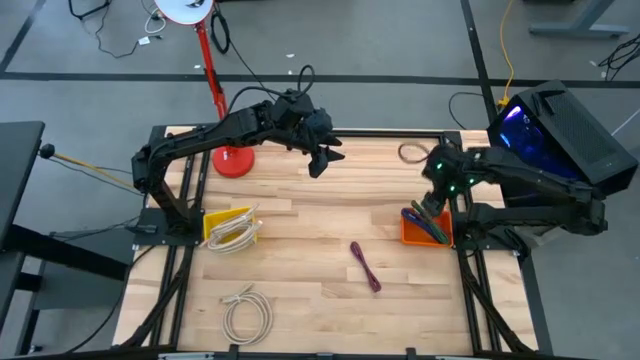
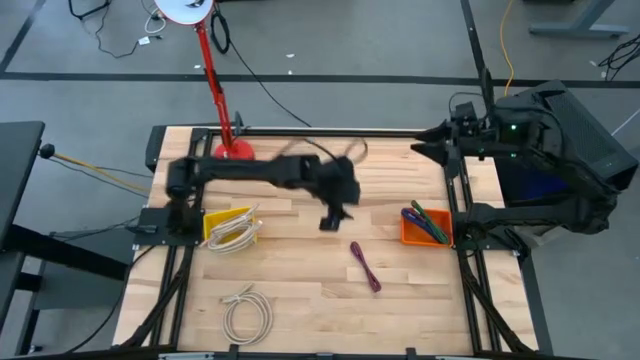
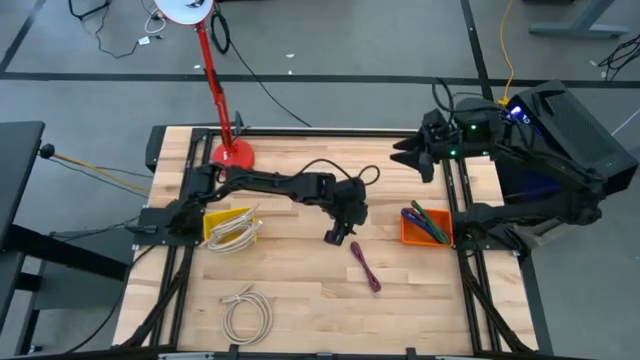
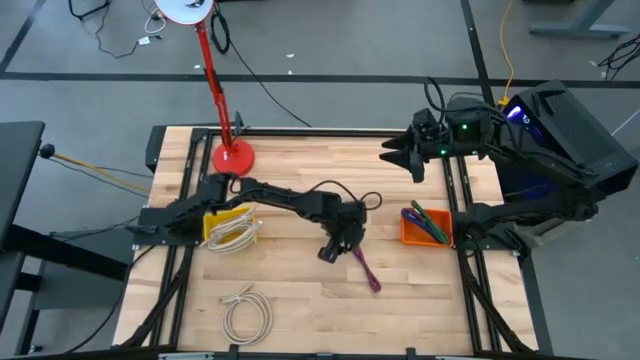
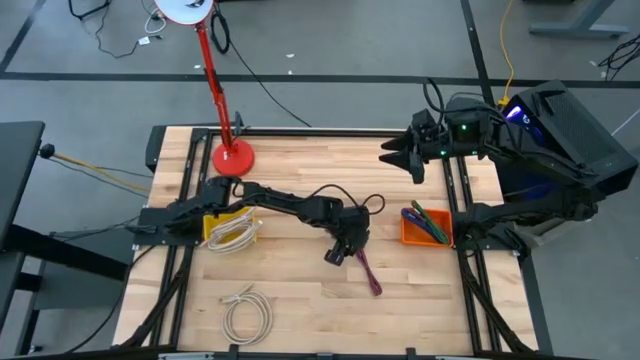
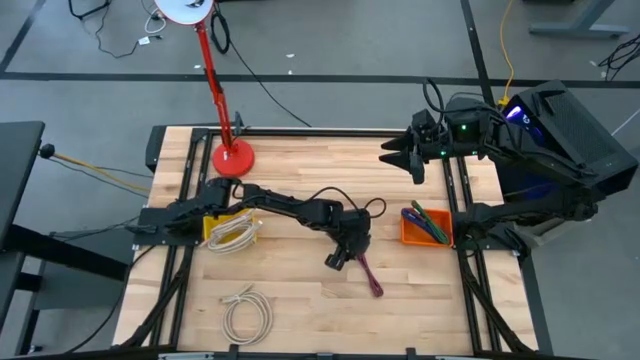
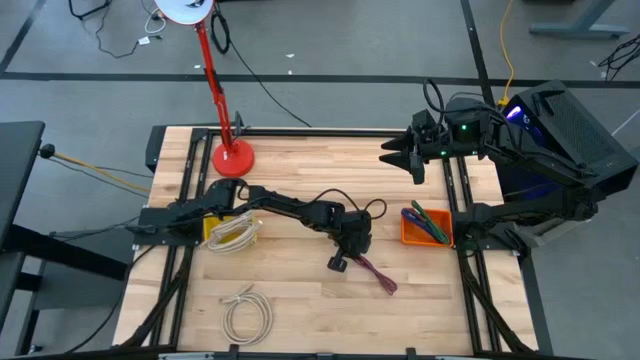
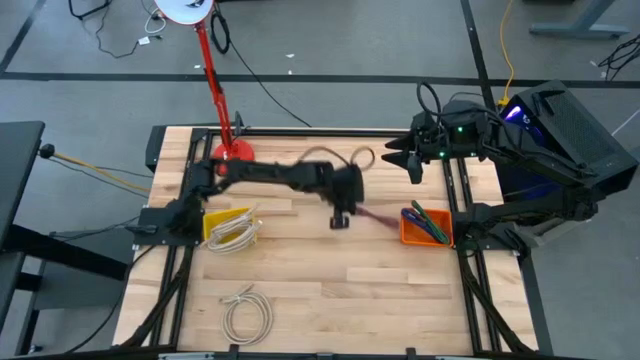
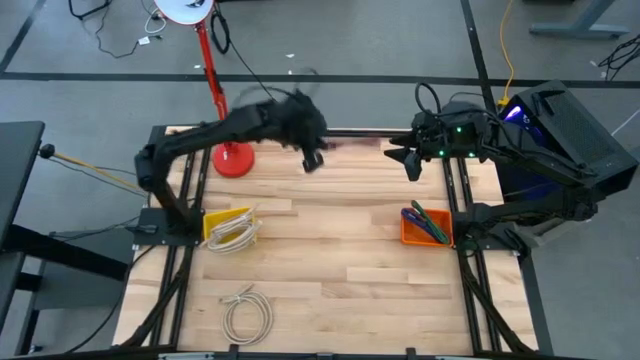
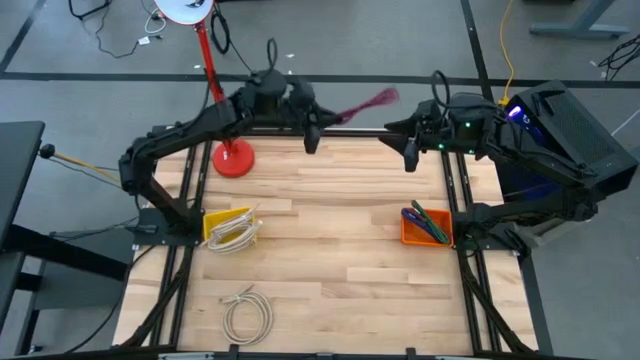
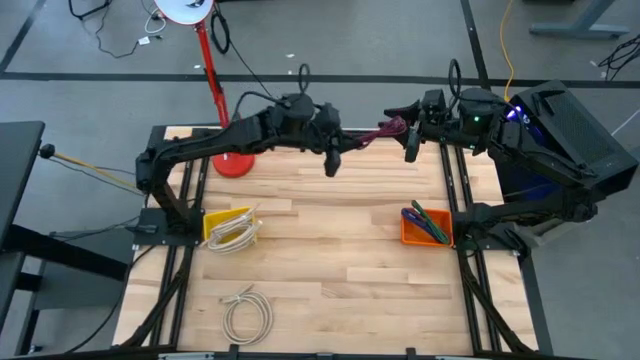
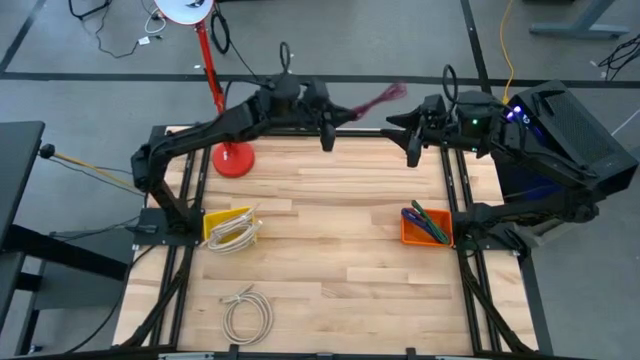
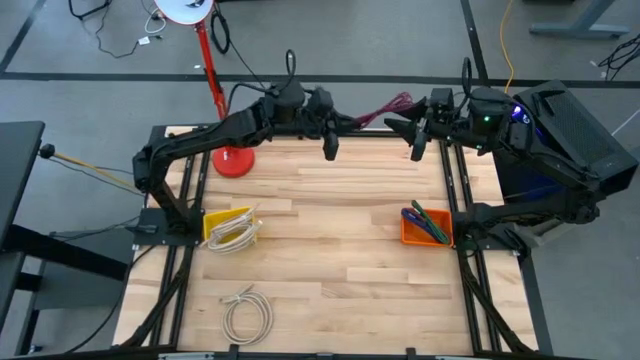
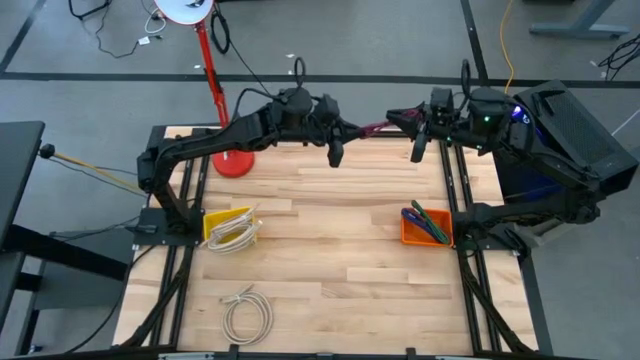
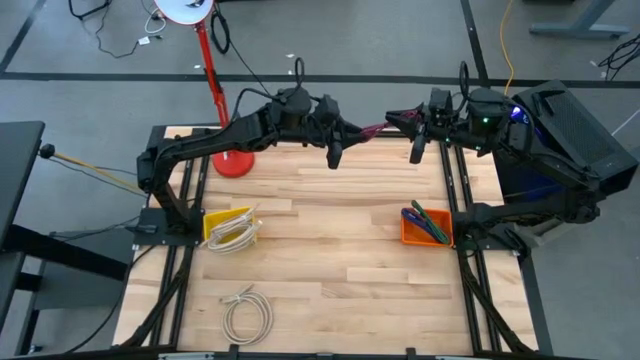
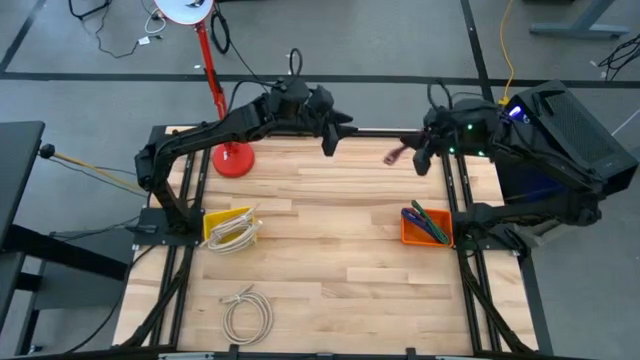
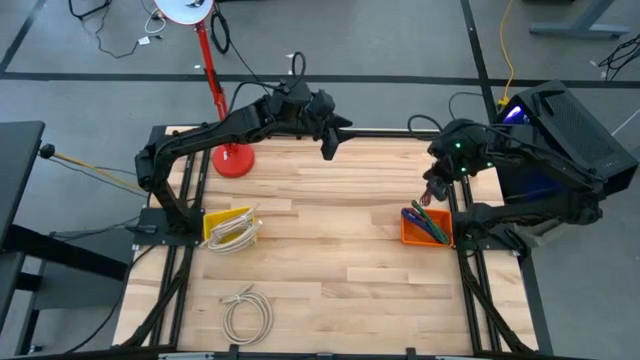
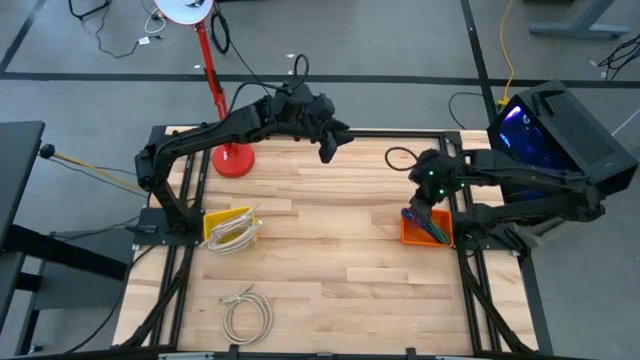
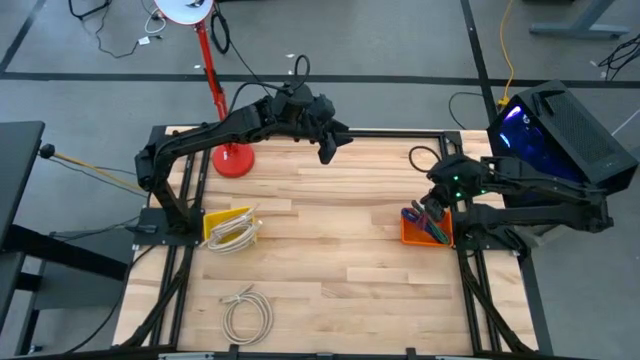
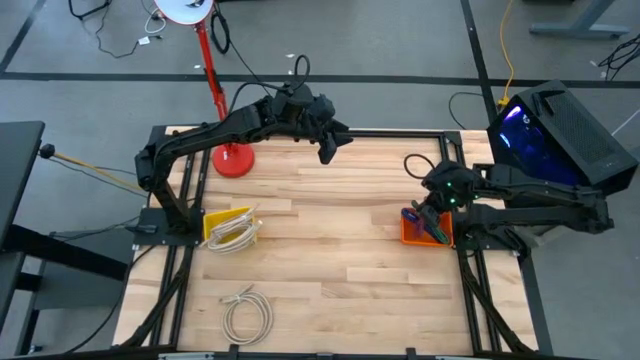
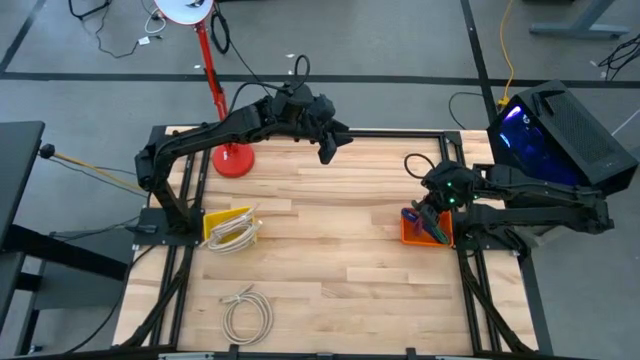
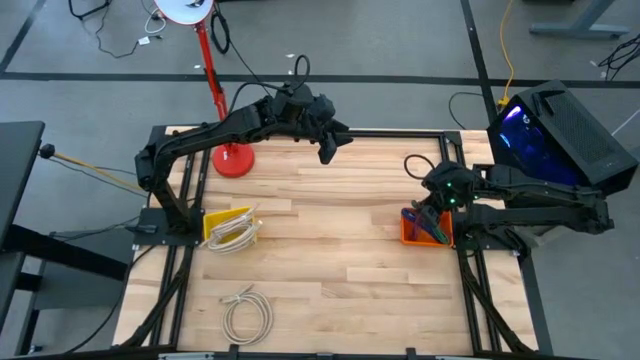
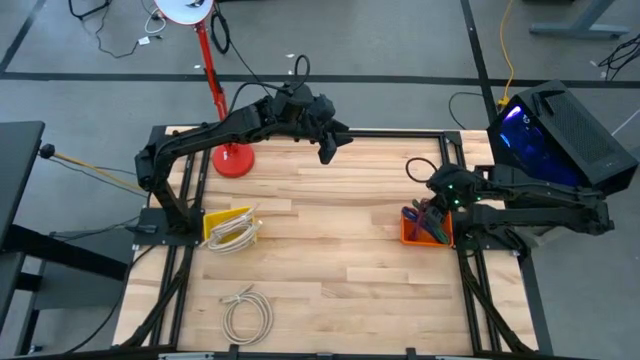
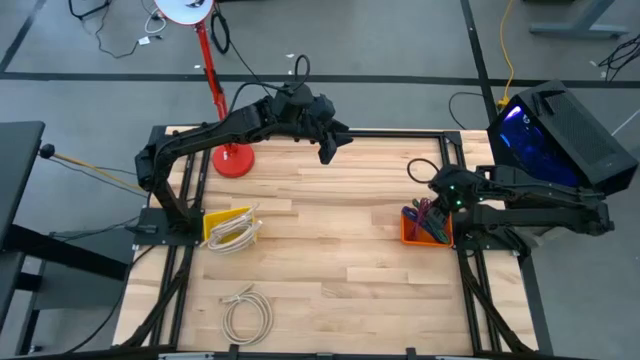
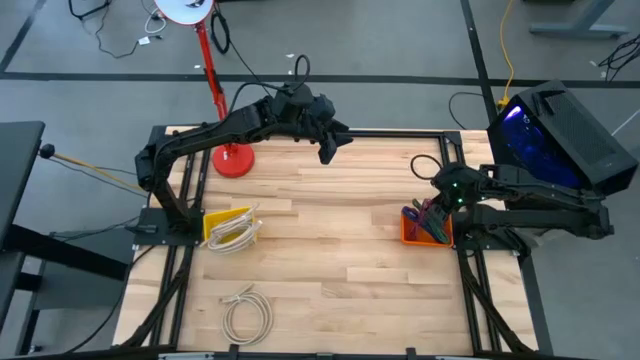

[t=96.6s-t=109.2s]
Task: Pick & Place USB Port
Put the pink USB cable into the orange bin

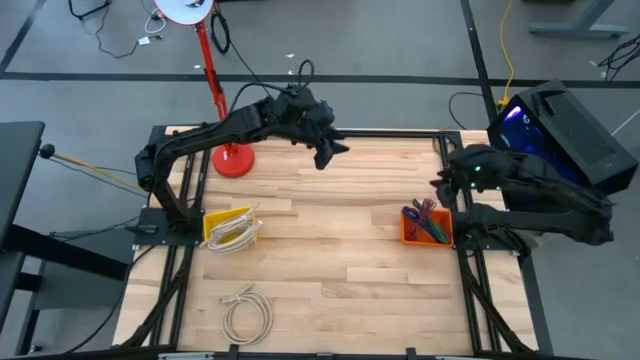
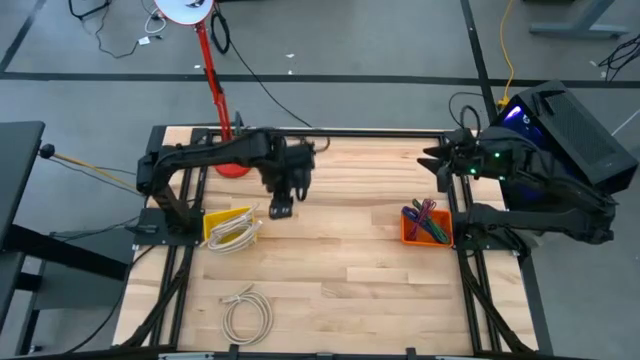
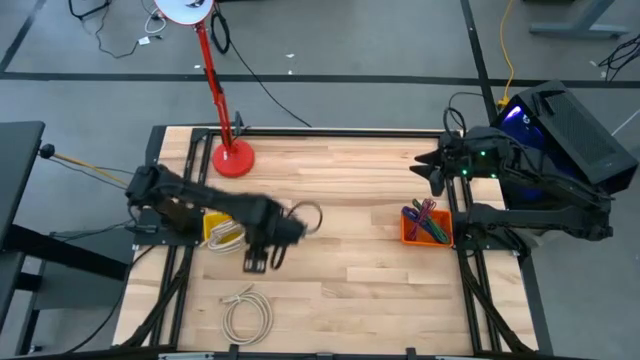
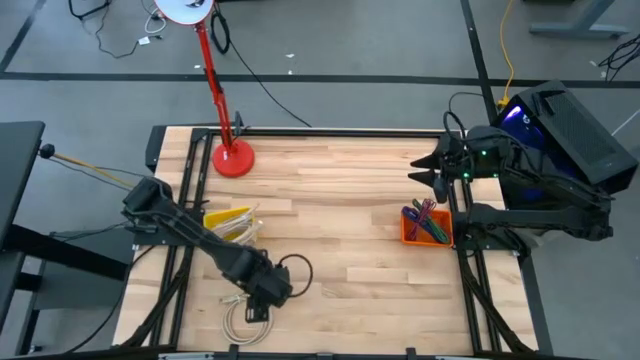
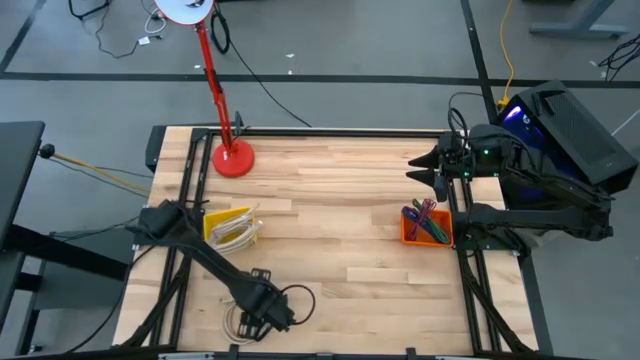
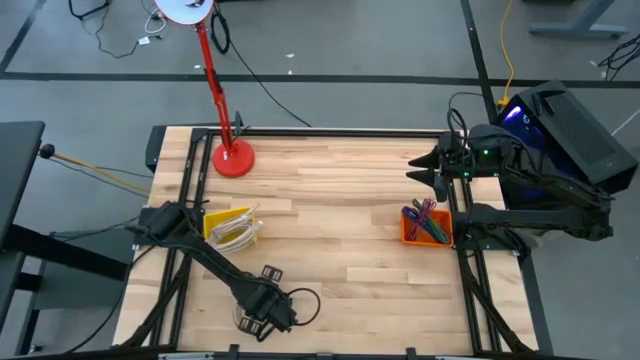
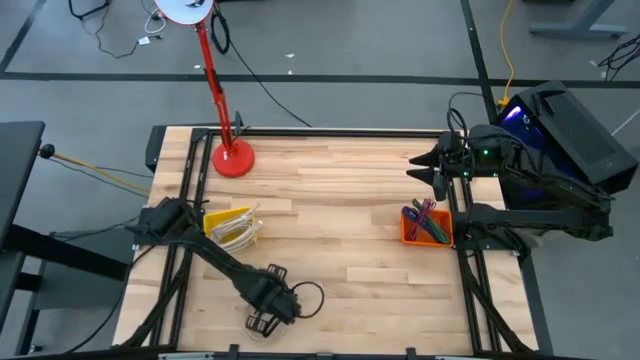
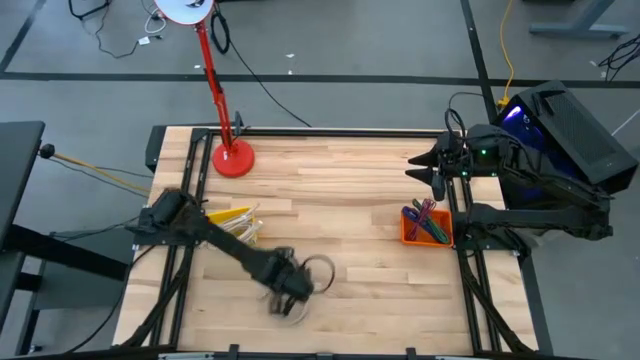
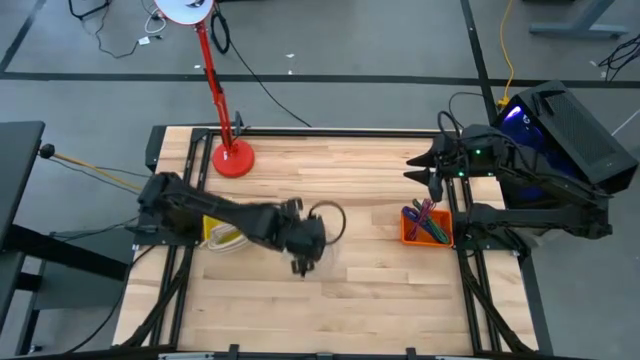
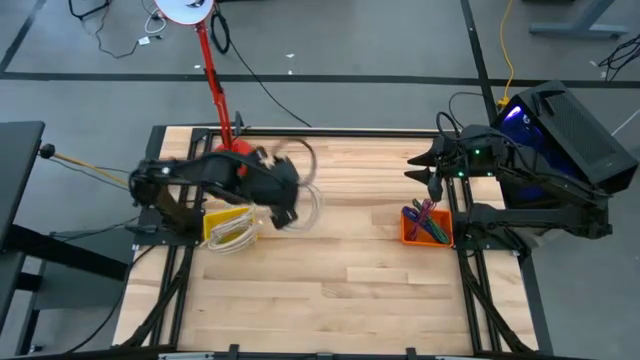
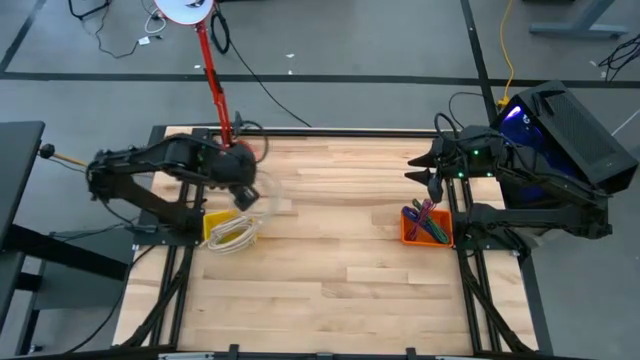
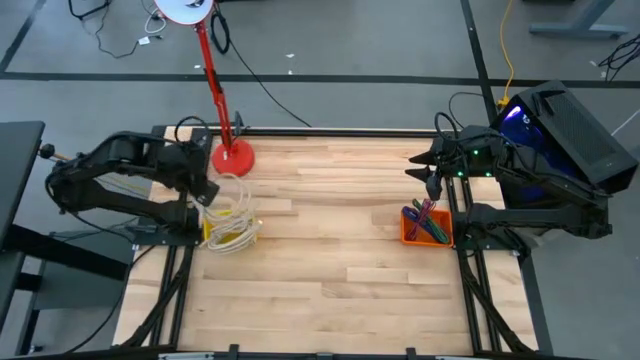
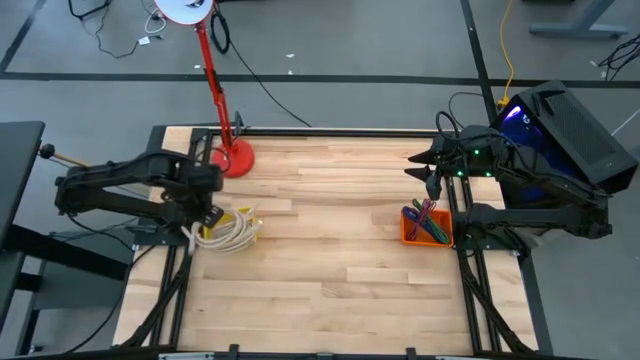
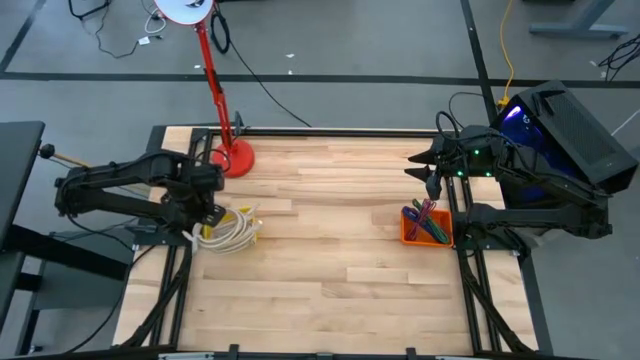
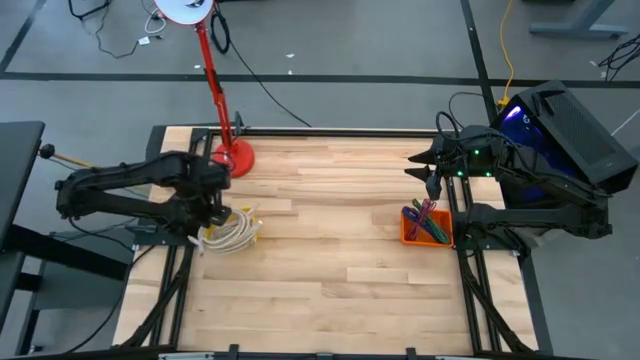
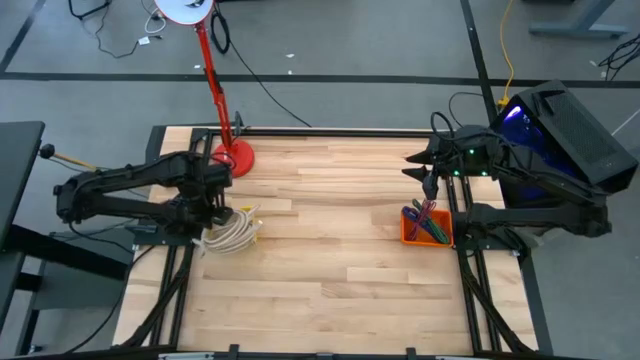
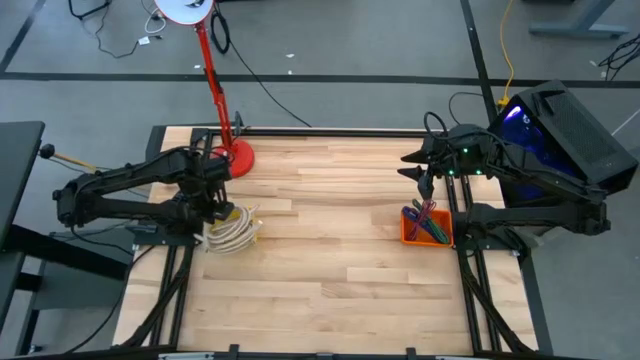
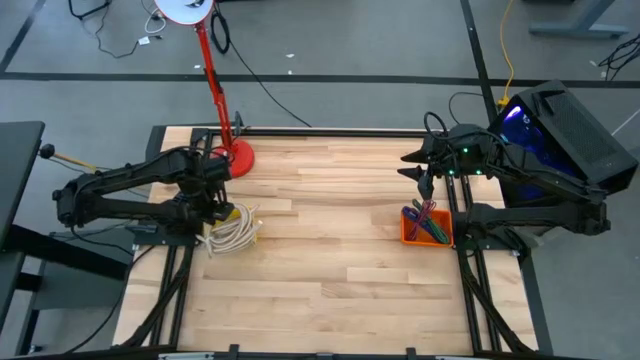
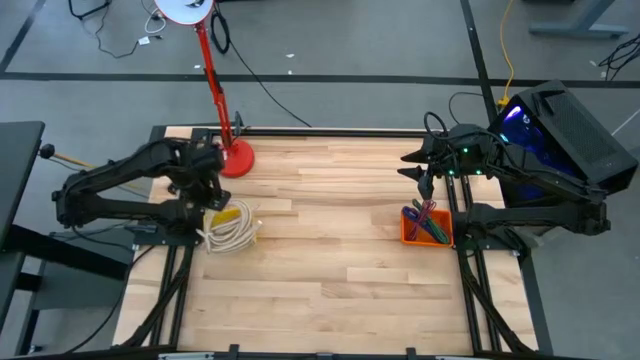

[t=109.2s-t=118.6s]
Put the light brown HDMI cable into the yellow bin
